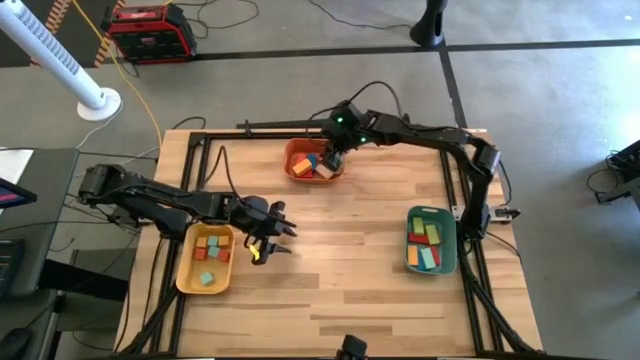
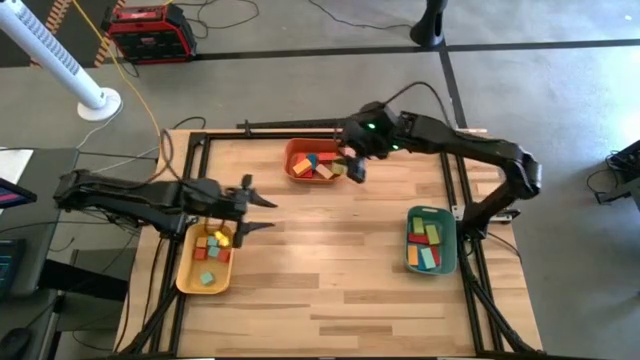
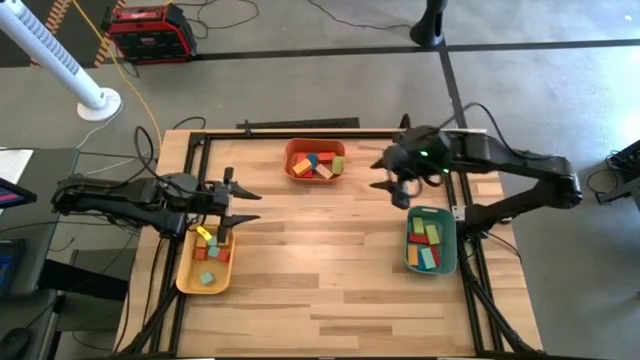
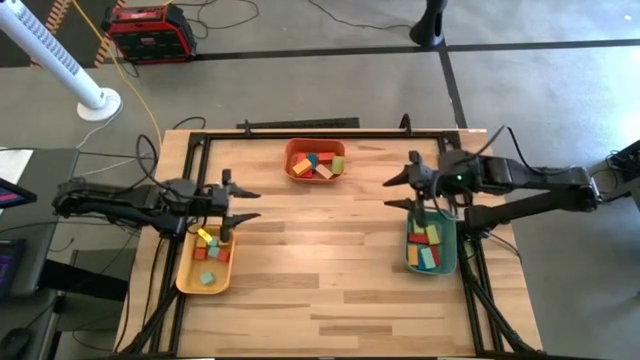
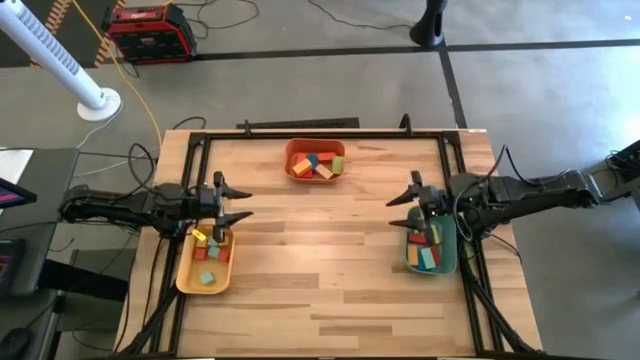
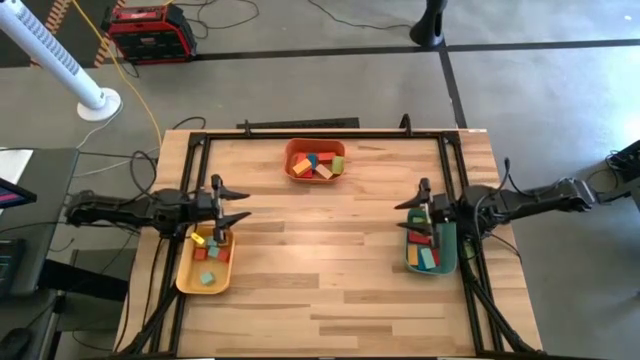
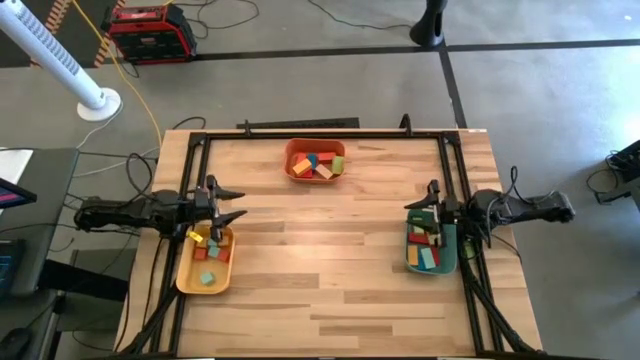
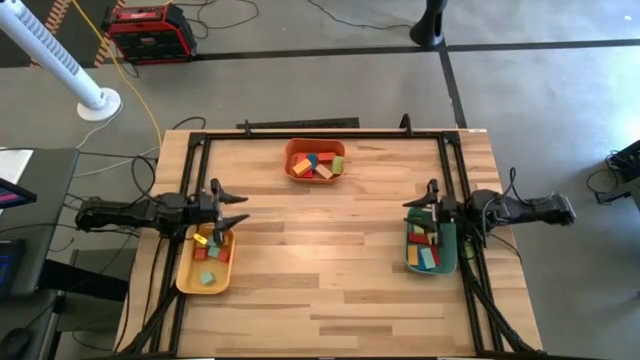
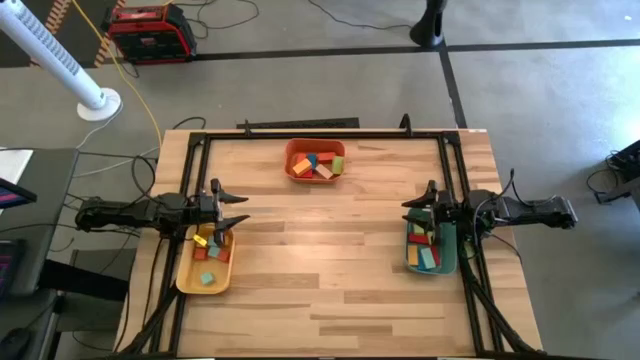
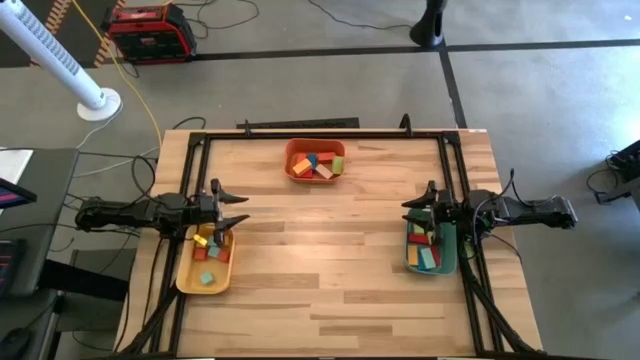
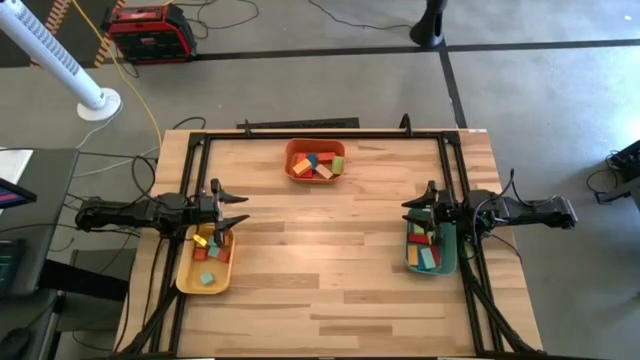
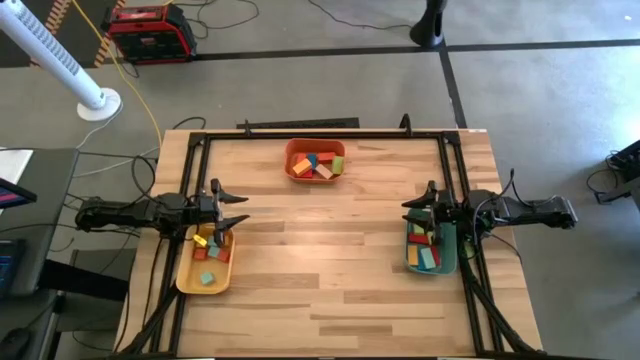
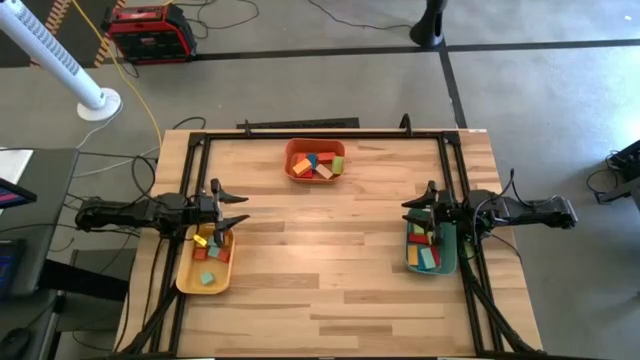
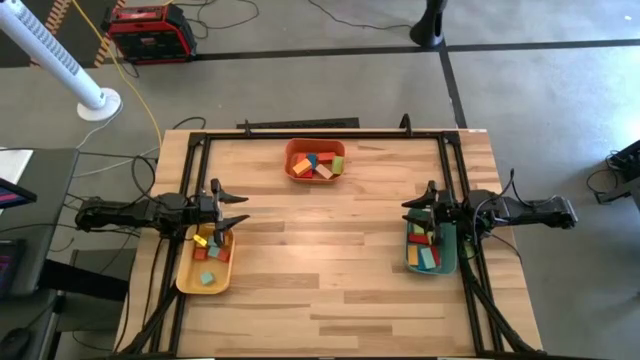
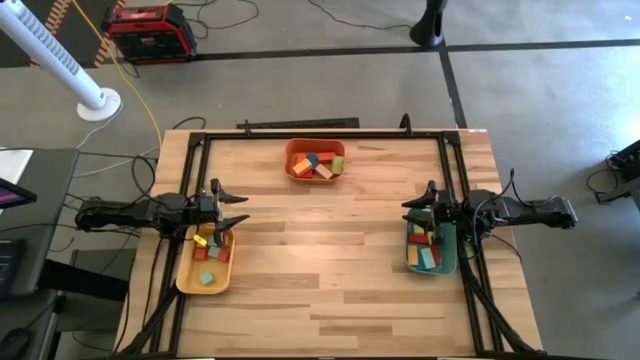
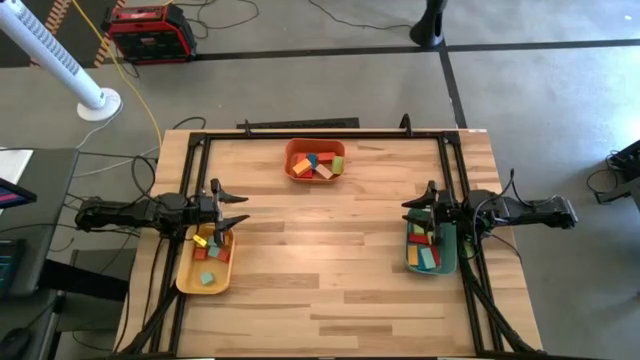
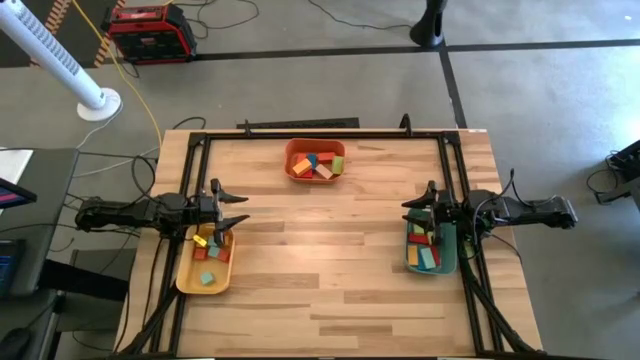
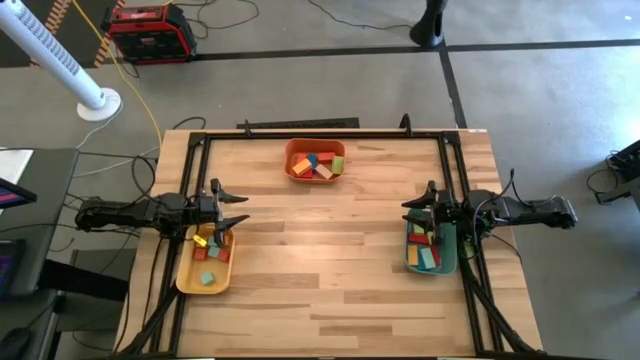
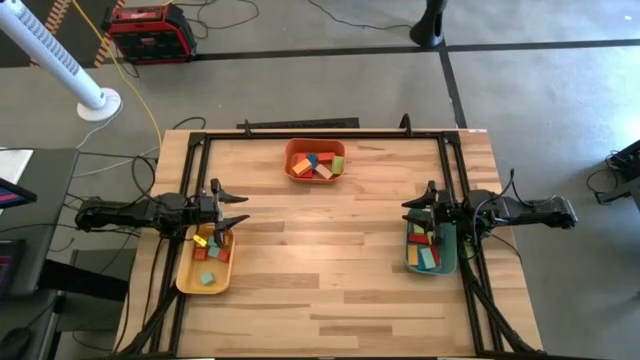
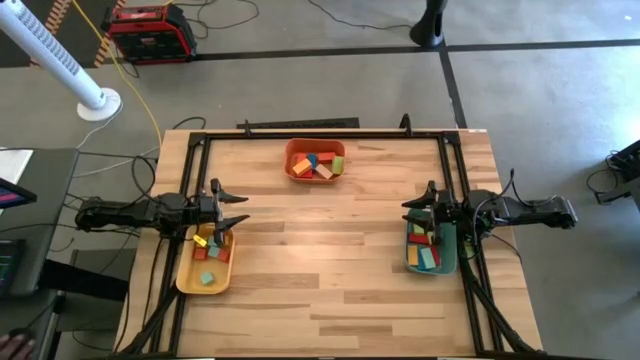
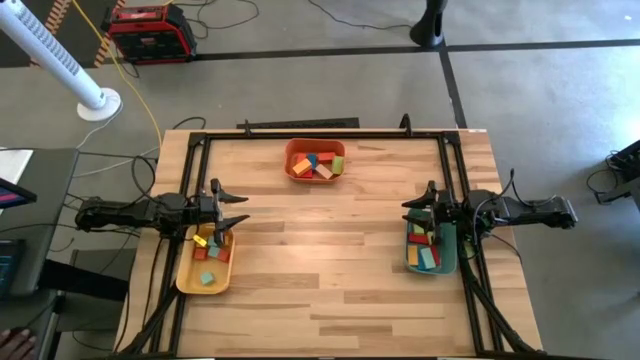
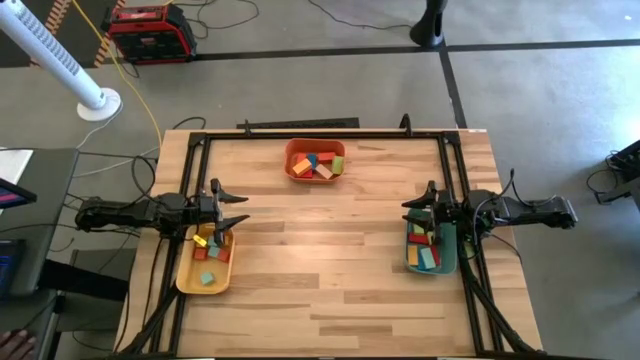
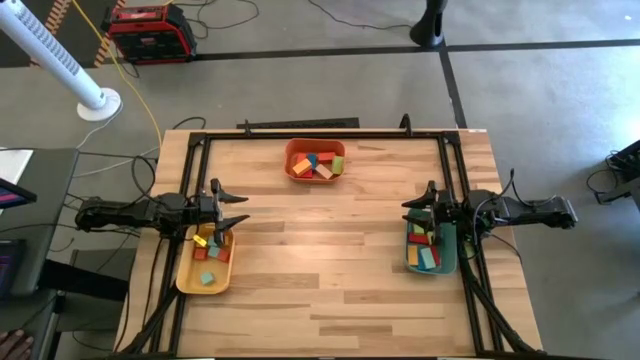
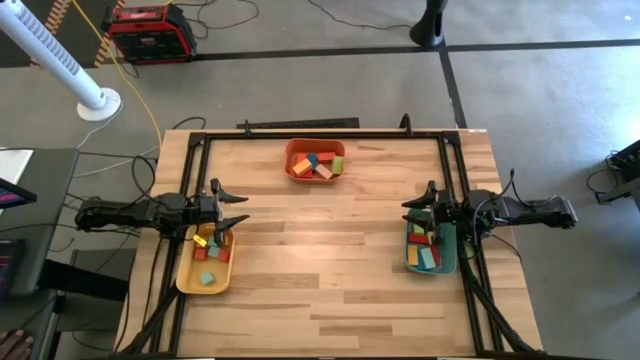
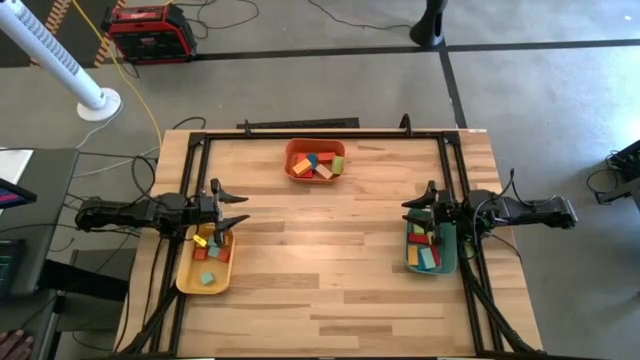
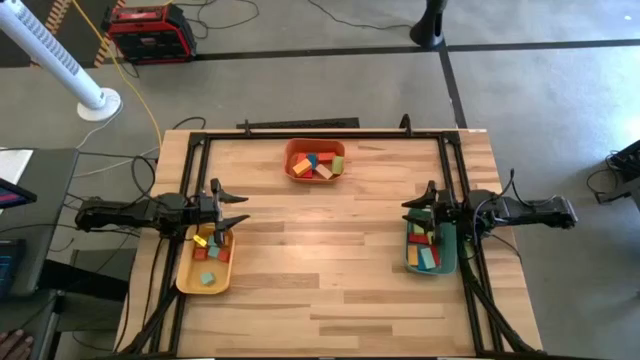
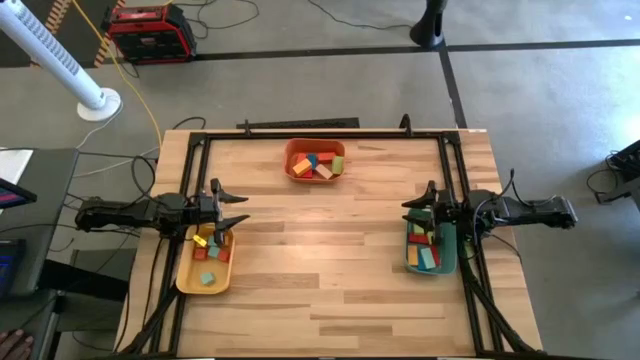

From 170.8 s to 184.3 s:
Task: Sort blocks by size
Return to Home Position

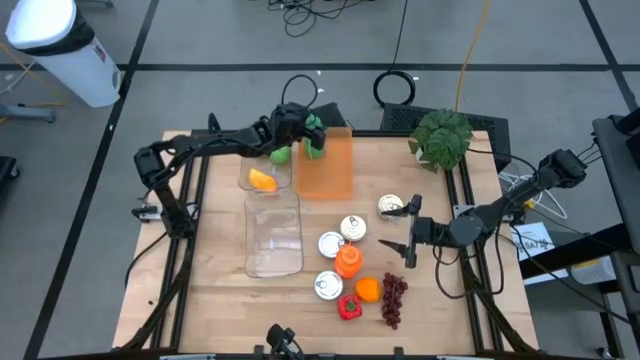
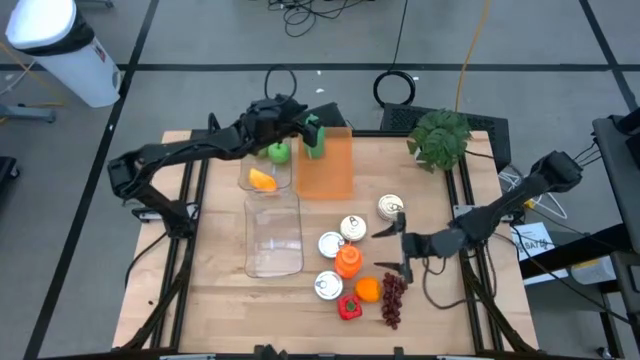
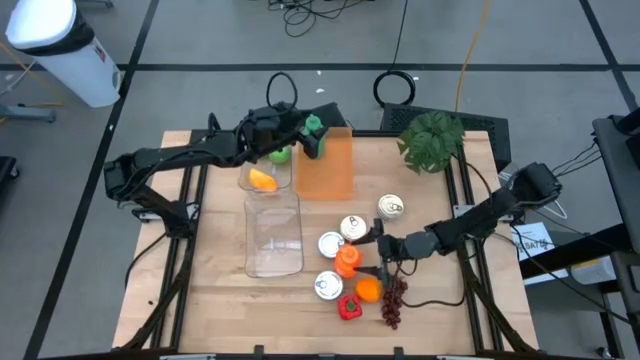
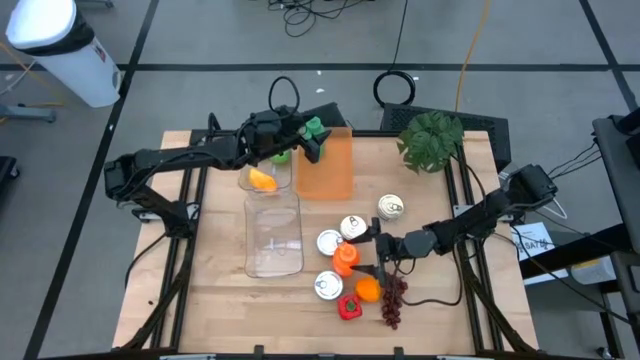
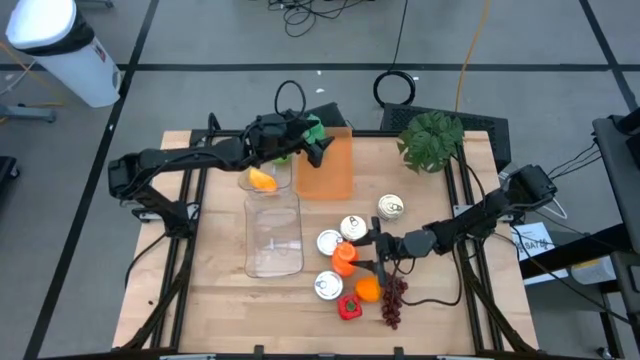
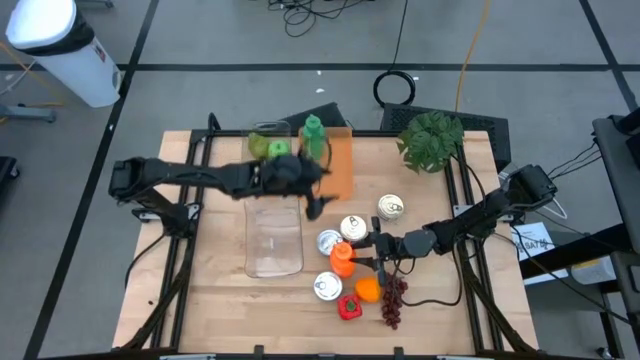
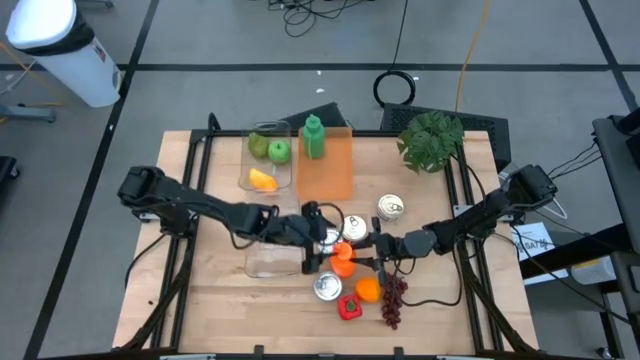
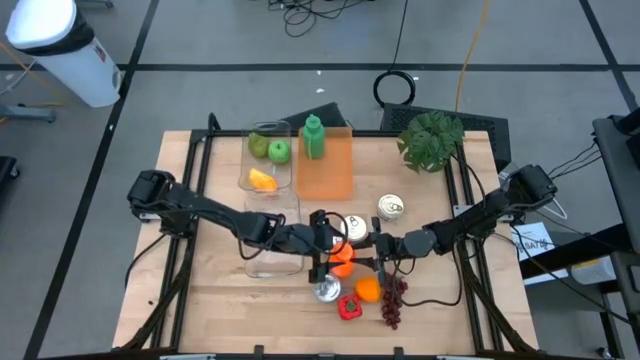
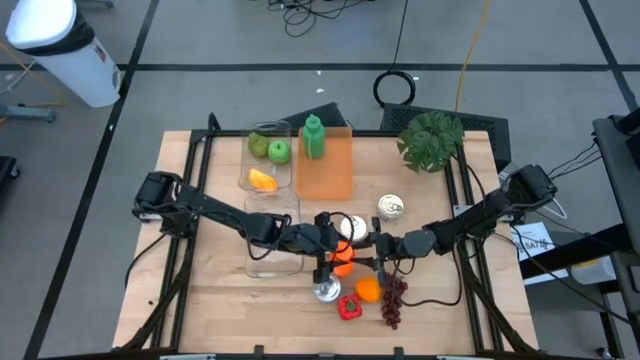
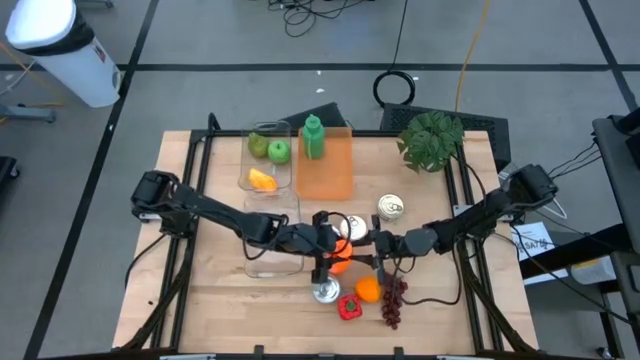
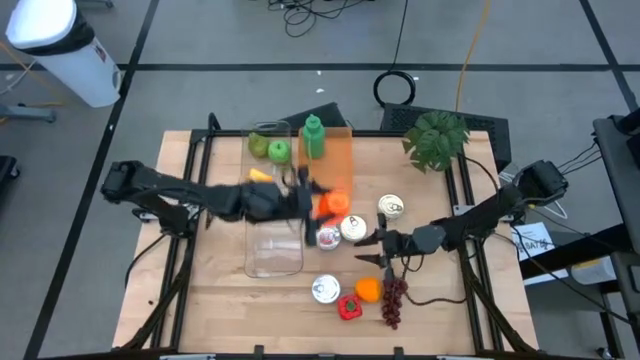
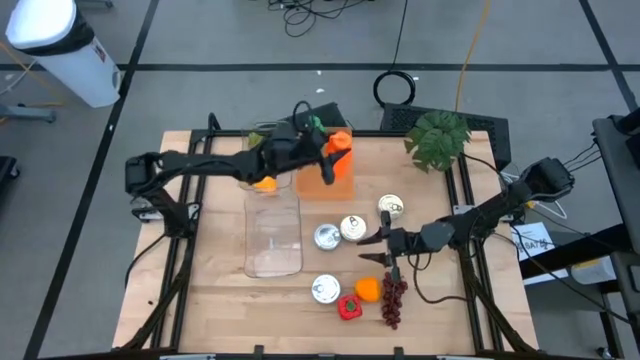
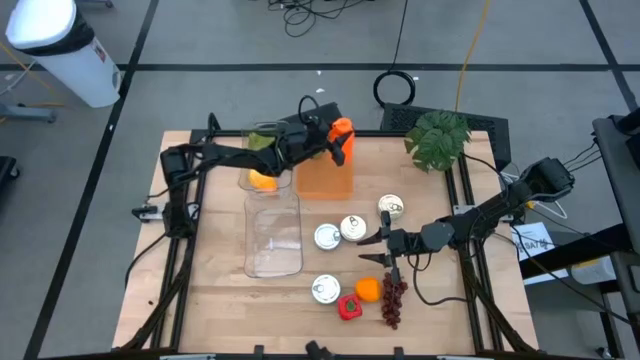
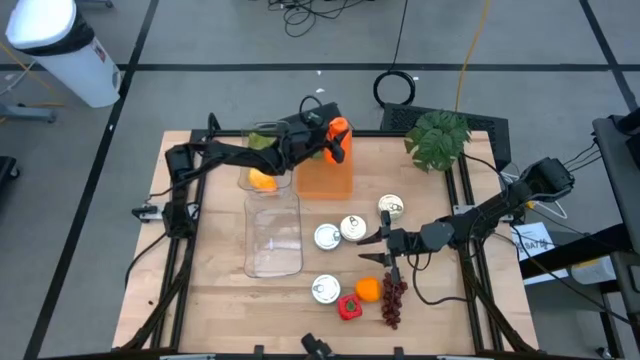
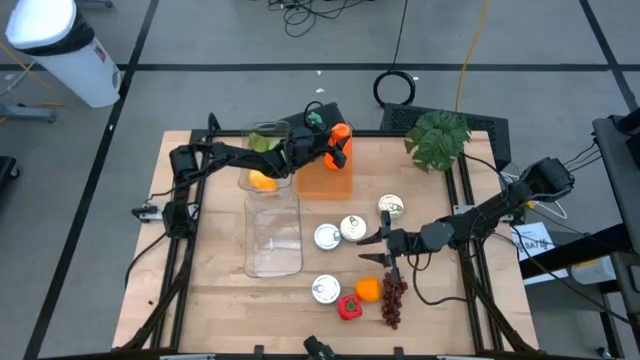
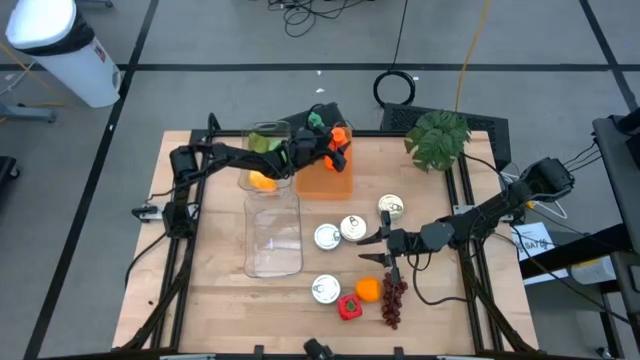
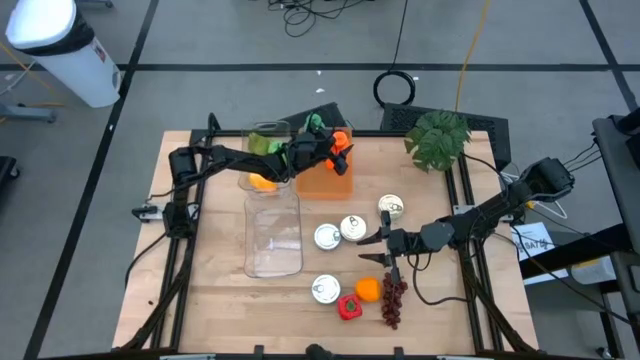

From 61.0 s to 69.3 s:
Task: Pick & Place Food Item
Put the orange water bottle into the orange bin
